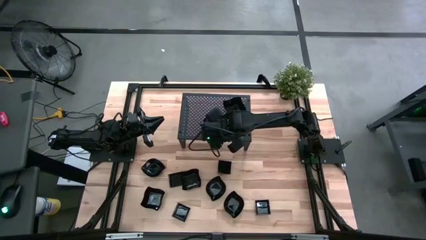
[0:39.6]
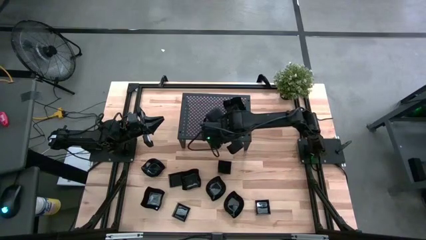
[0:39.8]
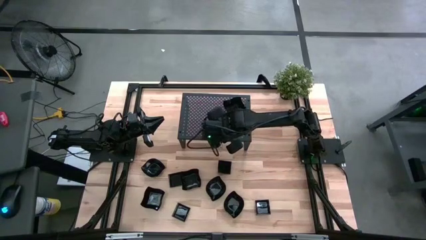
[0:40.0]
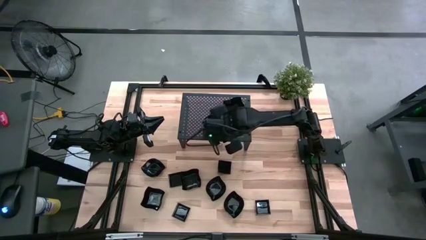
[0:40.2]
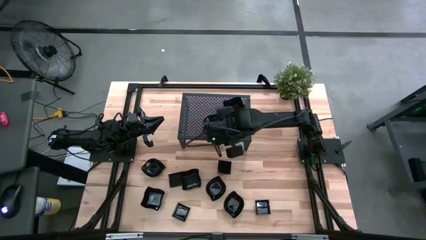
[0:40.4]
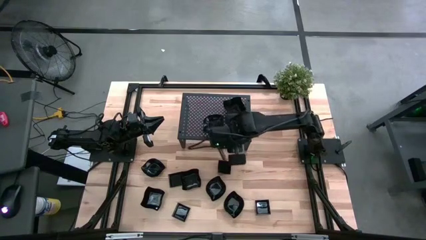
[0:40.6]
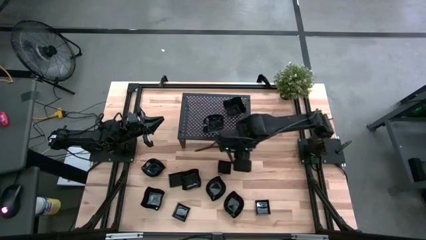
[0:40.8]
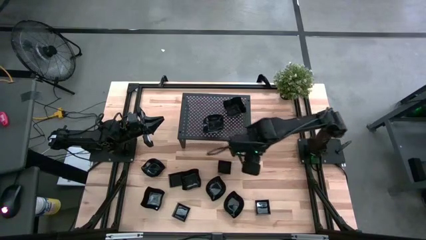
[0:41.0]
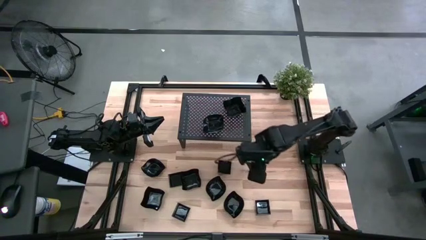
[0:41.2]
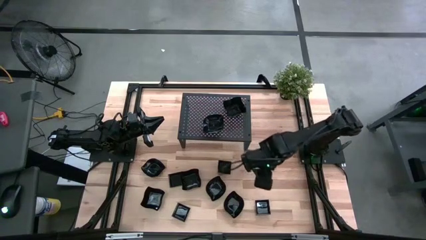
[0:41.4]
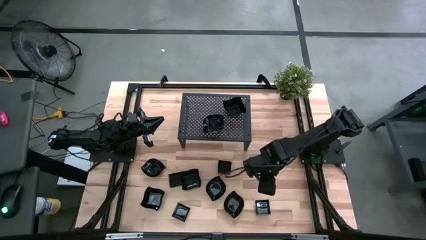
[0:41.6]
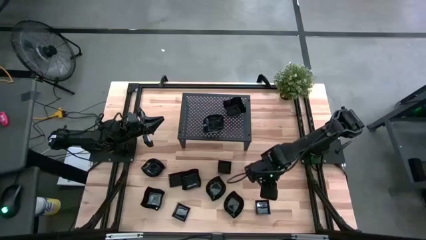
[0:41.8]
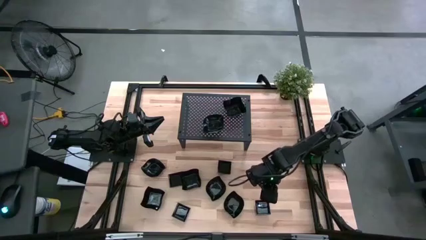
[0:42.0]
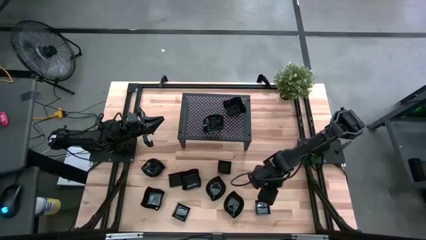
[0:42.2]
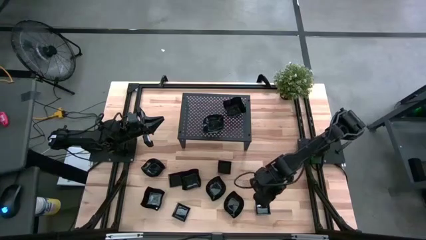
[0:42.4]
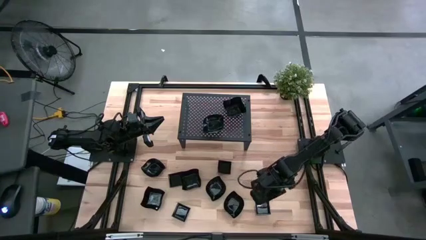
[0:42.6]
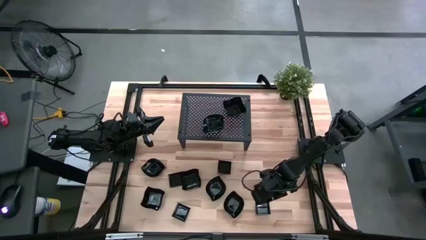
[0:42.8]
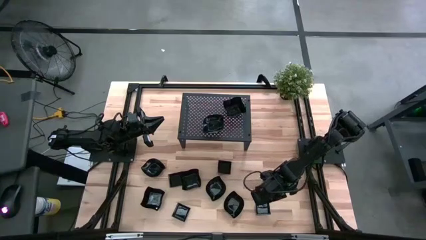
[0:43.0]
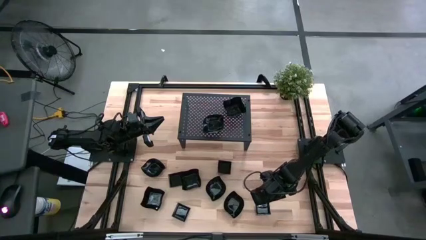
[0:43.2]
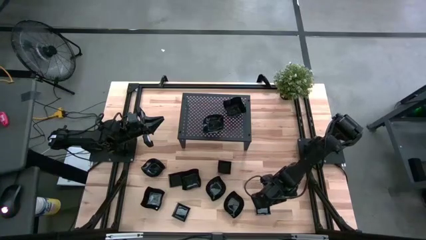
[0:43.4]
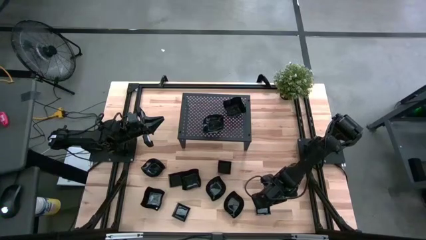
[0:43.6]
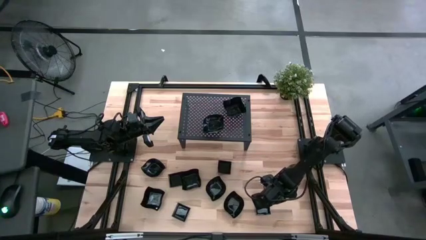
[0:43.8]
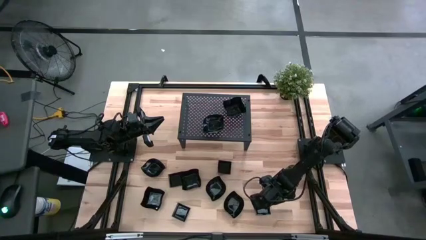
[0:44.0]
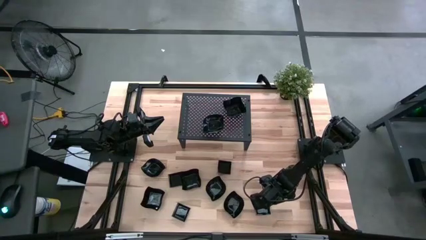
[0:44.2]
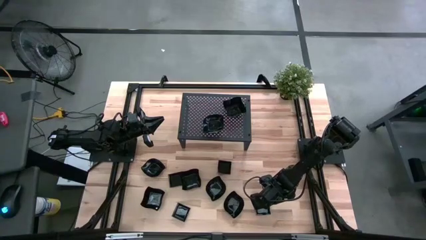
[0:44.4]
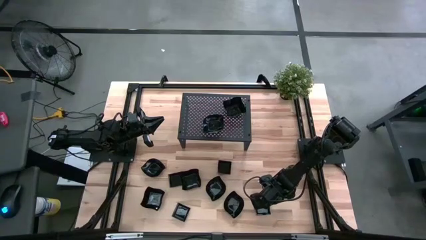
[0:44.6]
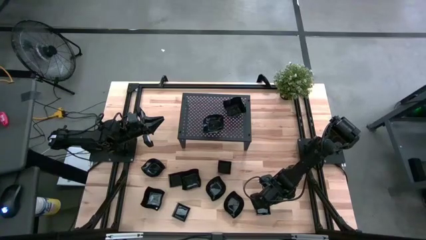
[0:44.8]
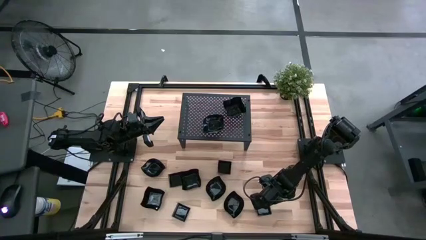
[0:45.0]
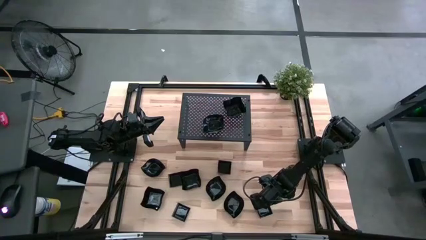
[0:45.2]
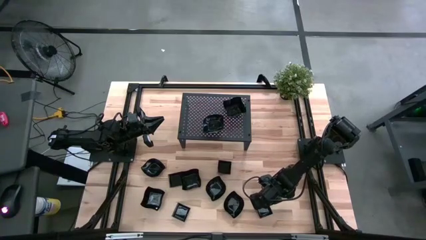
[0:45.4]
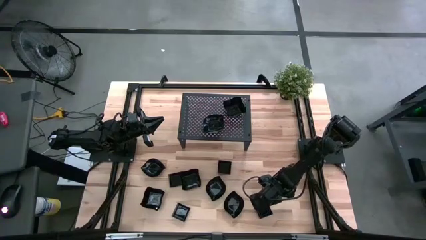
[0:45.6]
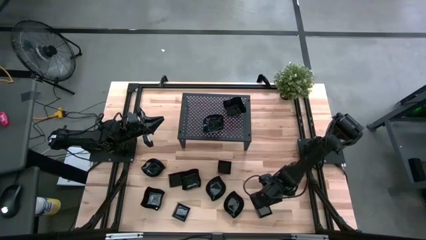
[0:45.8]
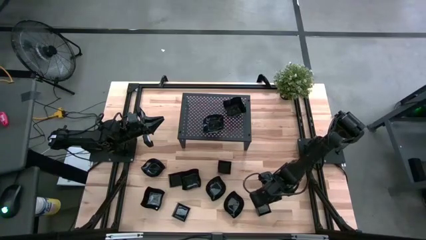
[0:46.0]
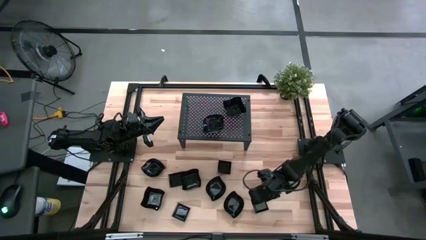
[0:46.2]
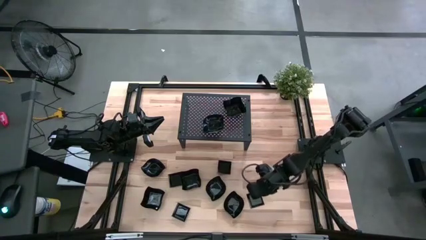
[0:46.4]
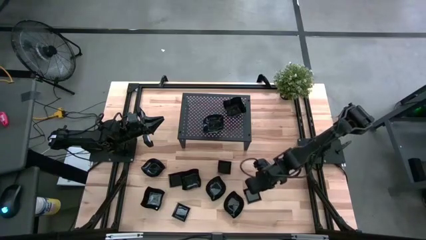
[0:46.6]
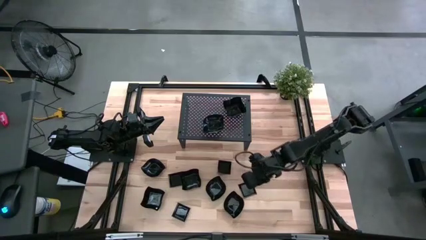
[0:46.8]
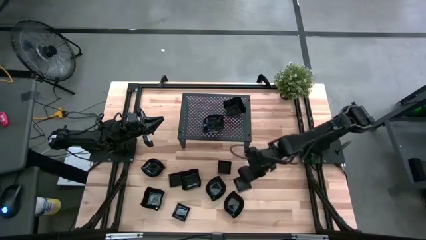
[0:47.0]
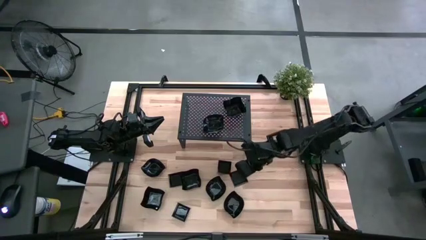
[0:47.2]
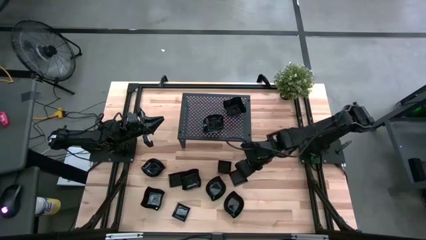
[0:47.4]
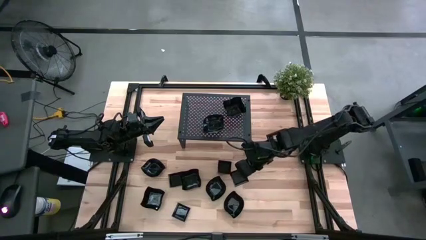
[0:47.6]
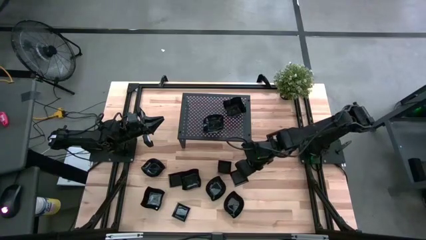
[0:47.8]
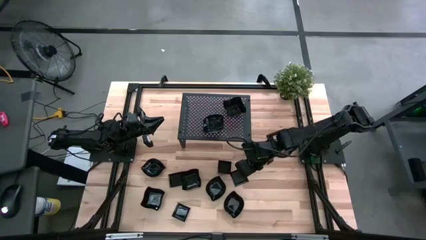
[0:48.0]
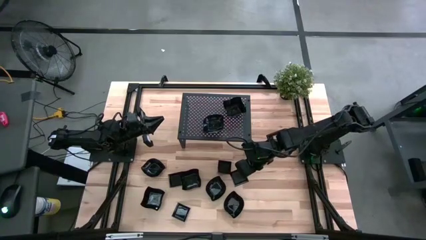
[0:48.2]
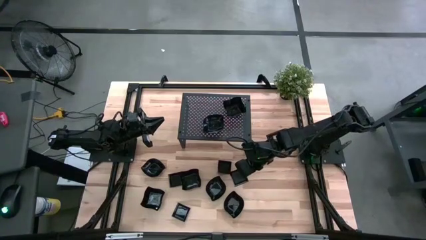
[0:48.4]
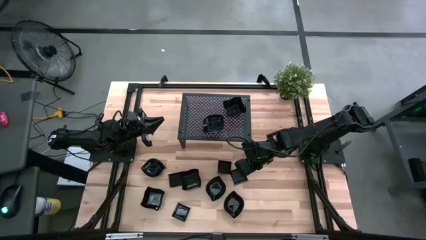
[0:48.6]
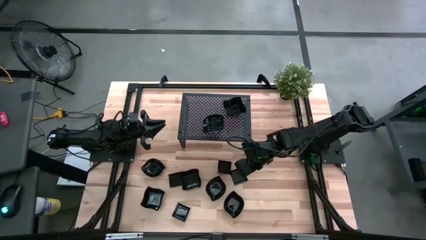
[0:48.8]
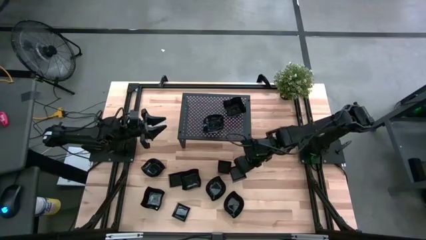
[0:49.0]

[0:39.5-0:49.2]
Task: Pick & Place Mini shaped plates
Put the black square plate on the shelf

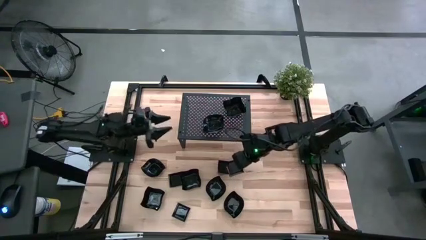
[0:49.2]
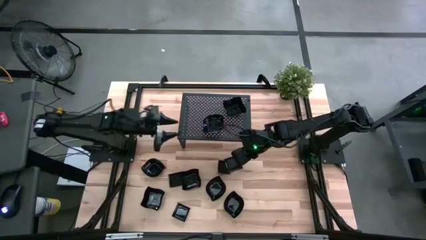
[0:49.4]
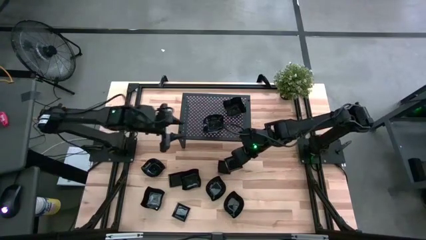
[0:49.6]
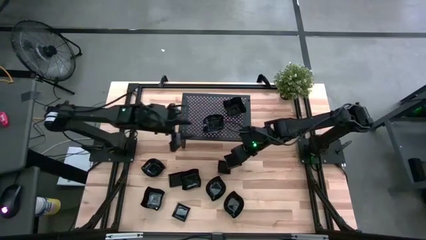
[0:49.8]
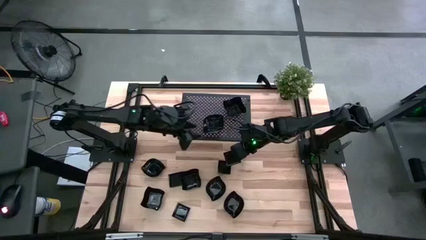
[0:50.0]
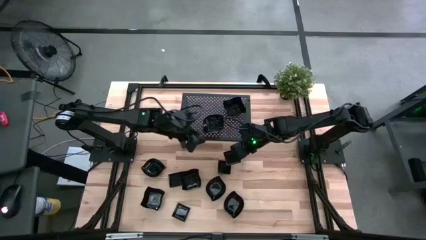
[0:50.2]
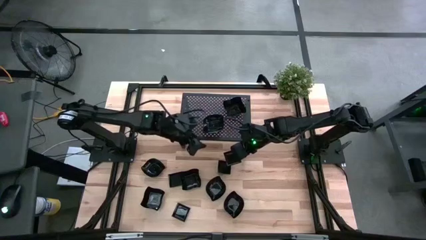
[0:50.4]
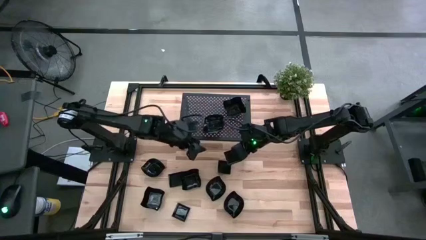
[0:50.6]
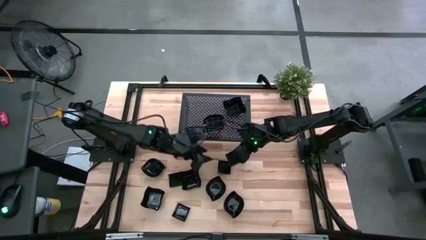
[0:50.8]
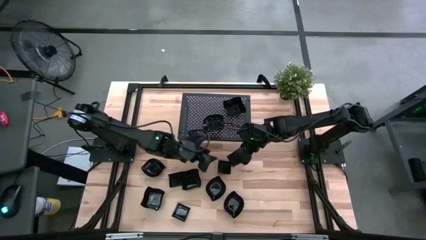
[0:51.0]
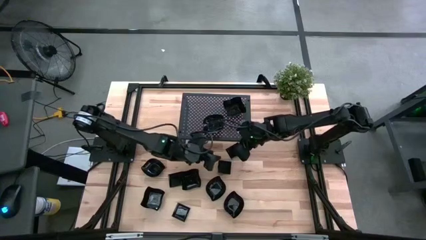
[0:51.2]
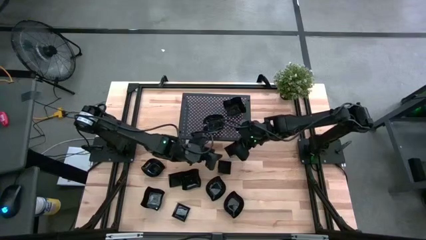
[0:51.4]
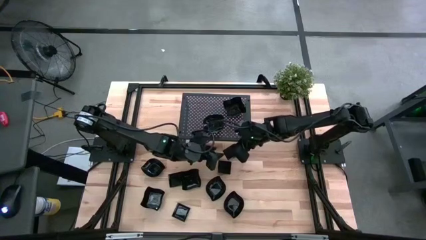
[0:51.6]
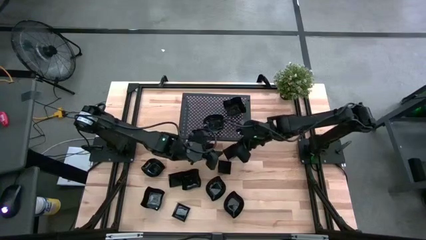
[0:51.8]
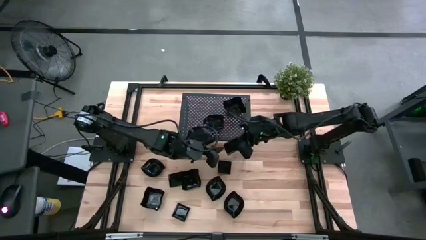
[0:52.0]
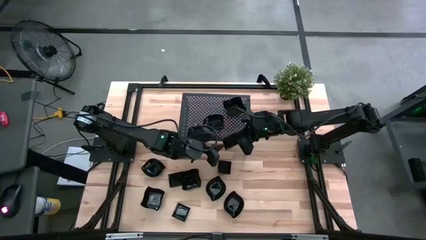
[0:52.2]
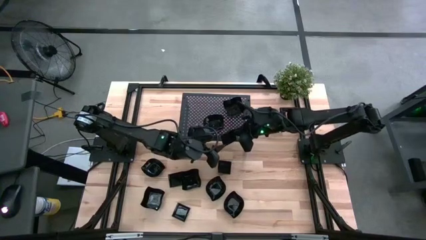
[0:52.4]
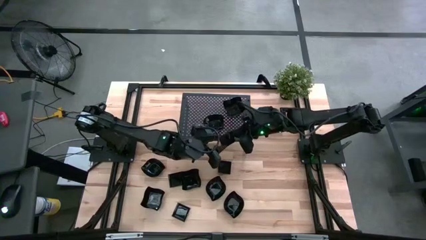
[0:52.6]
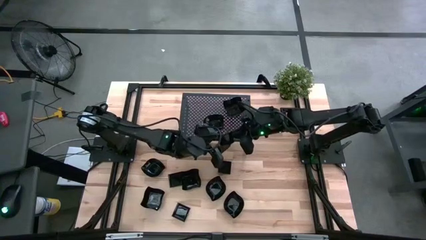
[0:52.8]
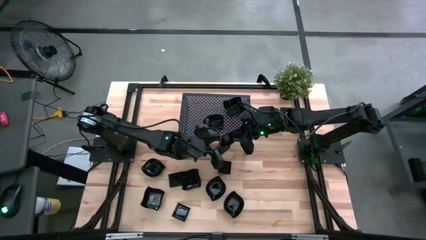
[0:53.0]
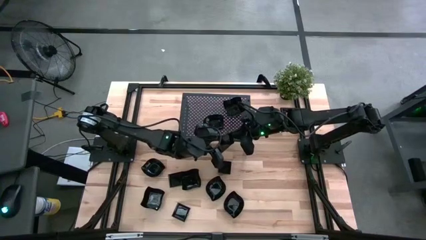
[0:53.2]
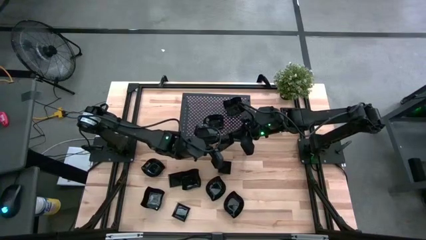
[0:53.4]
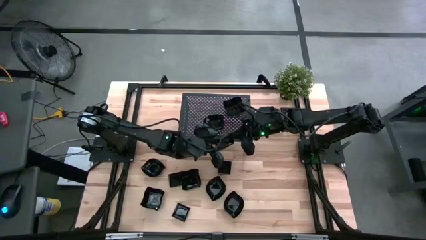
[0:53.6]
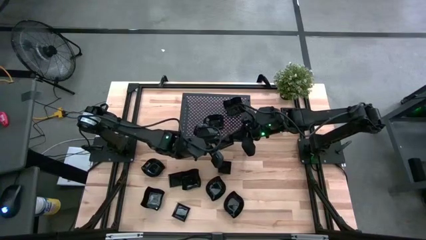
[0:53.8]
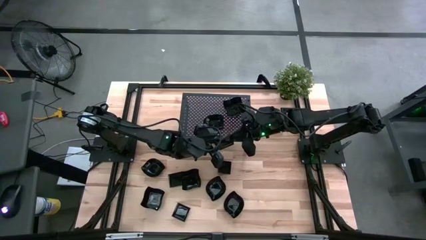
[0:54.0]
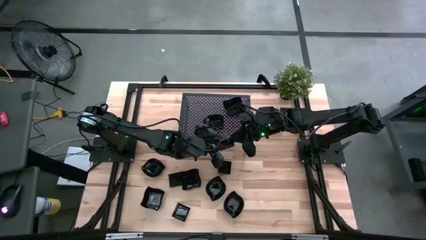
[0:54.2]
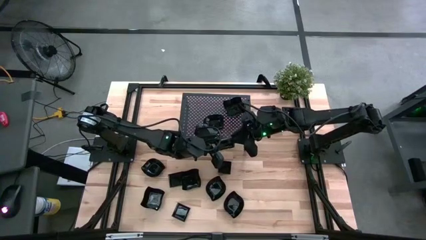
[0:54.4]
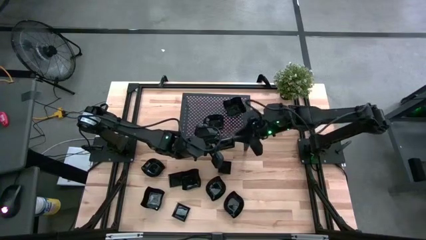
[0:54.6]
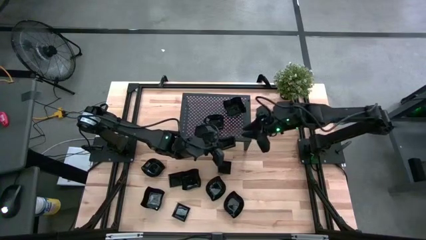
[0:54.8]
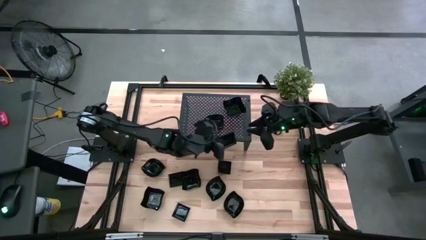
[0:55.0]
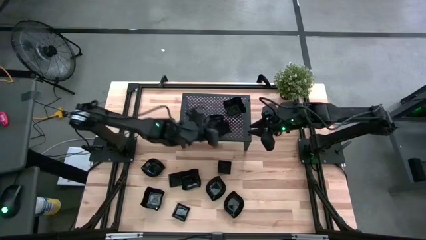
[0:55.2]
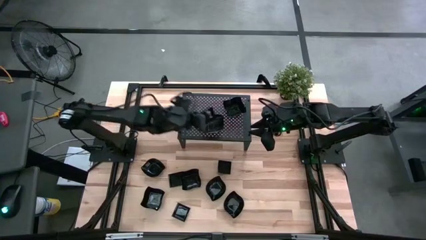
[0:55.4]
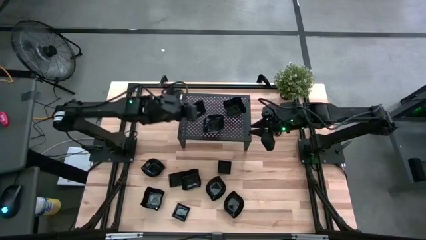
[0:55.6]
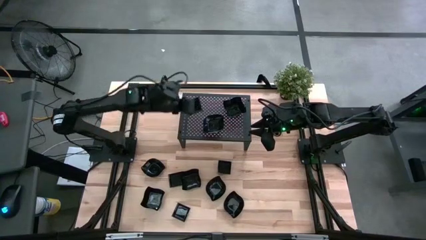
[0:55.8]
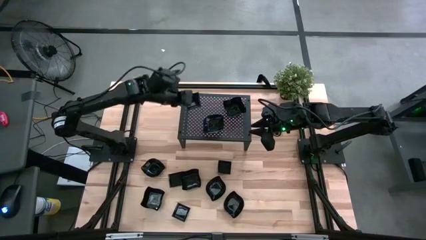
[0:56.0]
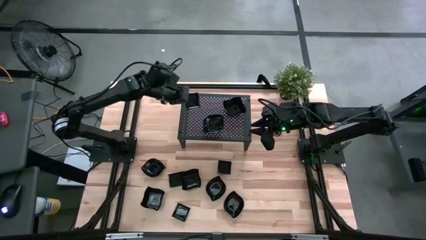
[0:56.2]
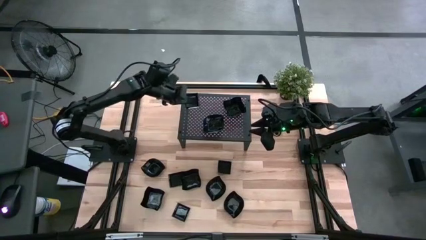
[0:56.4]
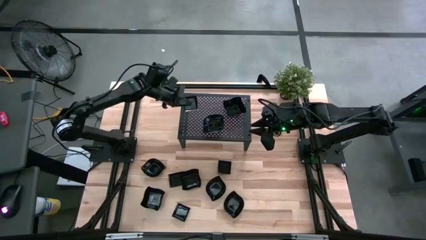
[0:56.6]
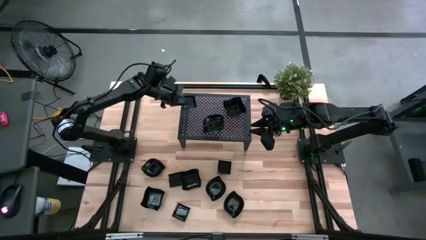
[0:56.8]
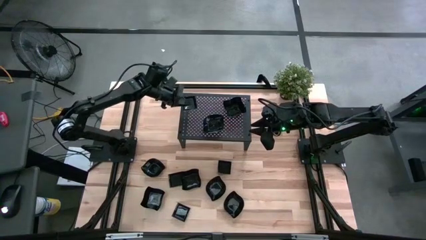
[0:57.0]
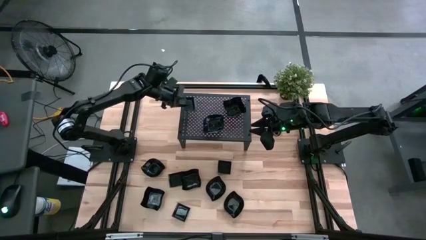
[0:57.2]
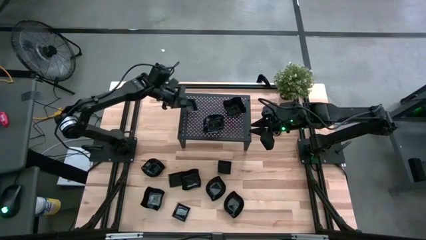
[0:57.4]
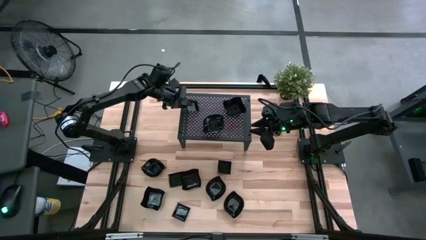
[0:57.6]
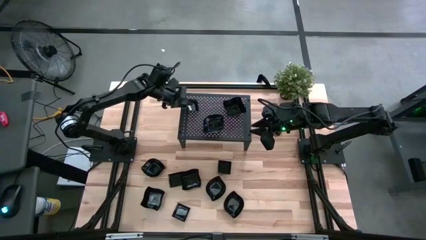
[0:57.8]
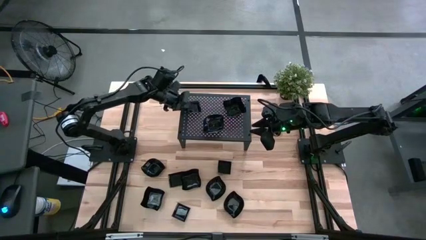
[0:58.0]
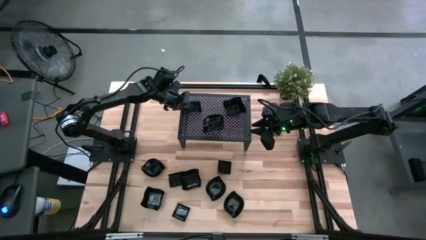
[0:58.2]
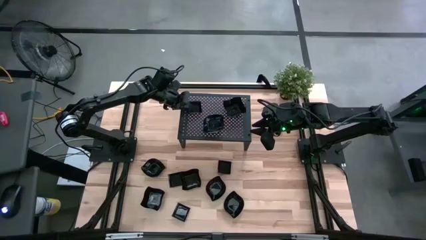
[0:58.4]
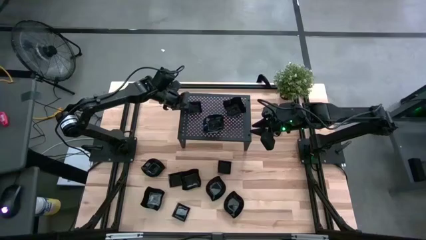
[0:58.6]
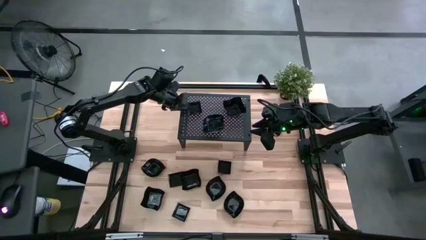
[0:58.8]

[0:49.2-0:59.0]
Put the black square plate on the shelf
